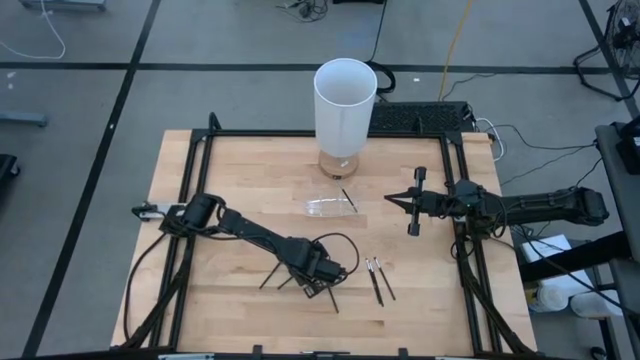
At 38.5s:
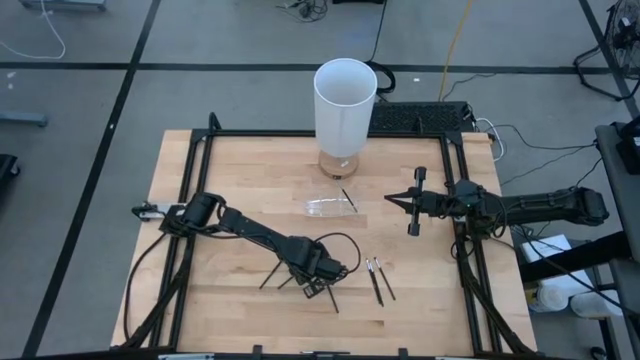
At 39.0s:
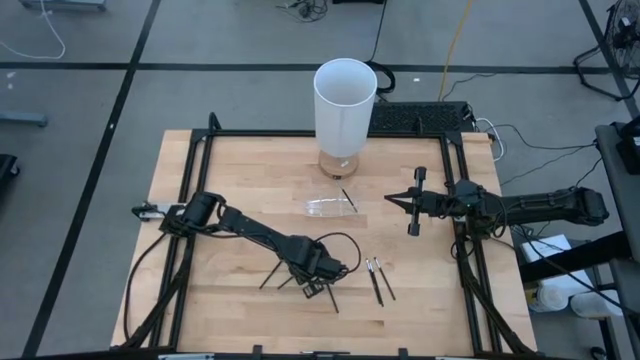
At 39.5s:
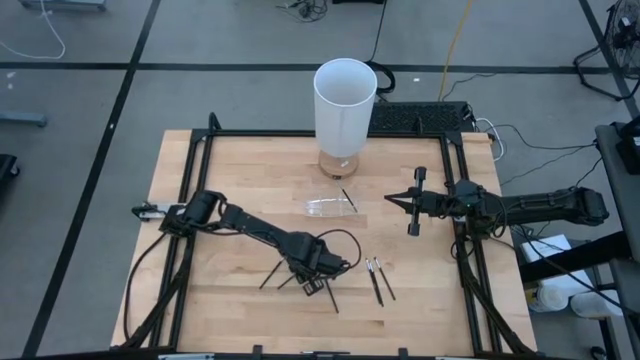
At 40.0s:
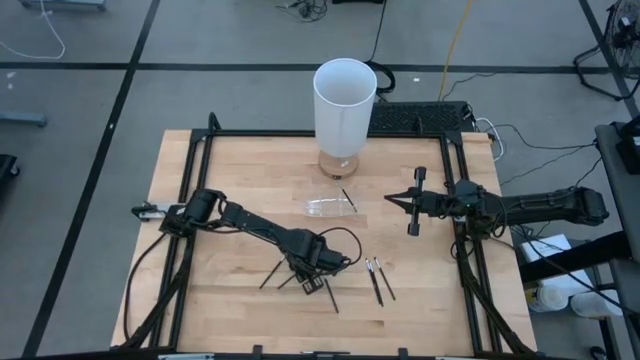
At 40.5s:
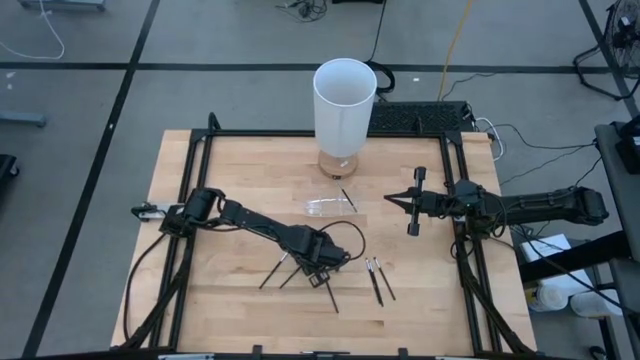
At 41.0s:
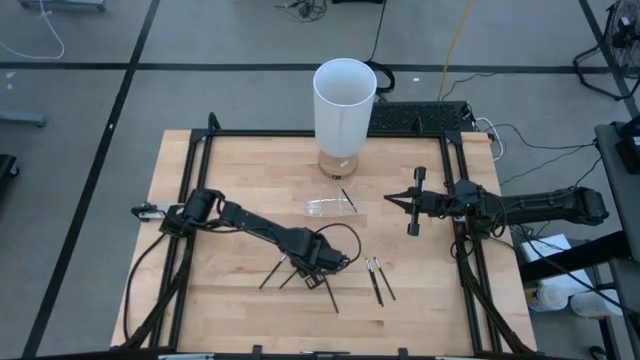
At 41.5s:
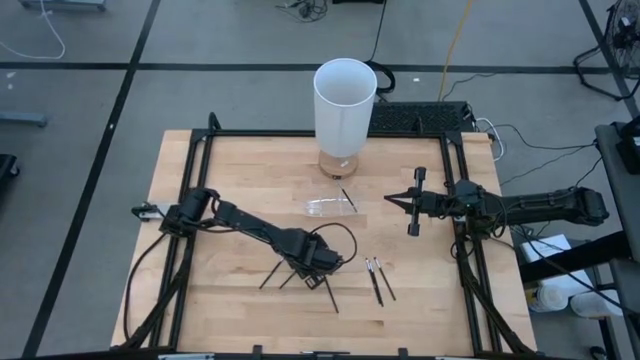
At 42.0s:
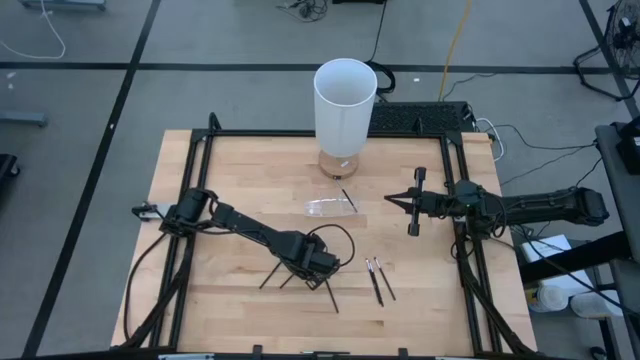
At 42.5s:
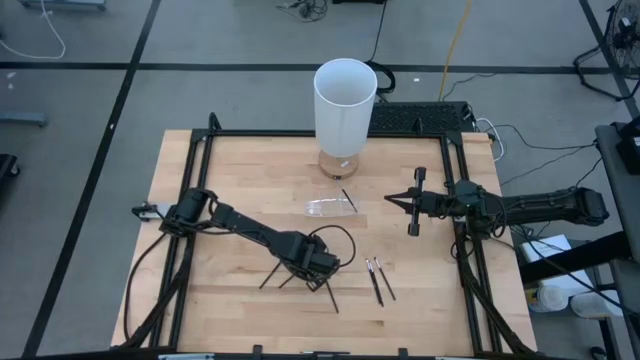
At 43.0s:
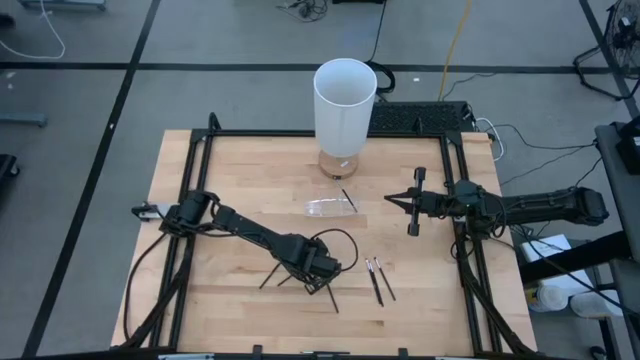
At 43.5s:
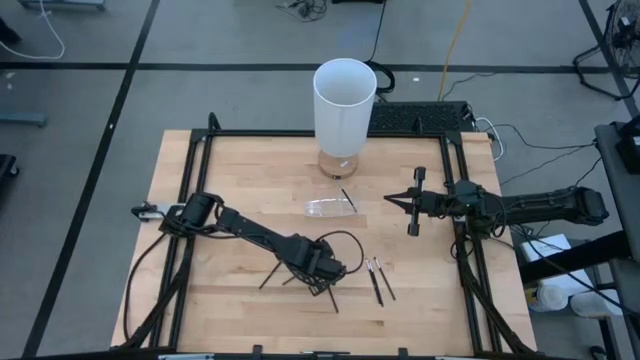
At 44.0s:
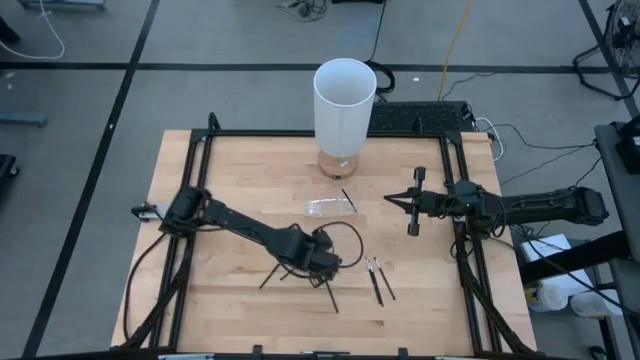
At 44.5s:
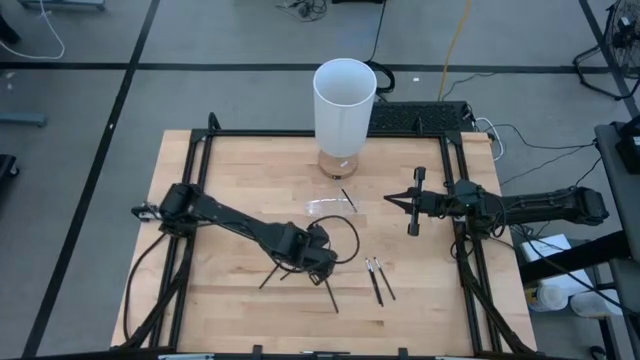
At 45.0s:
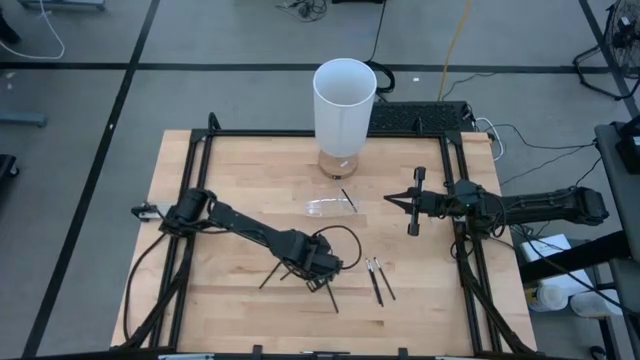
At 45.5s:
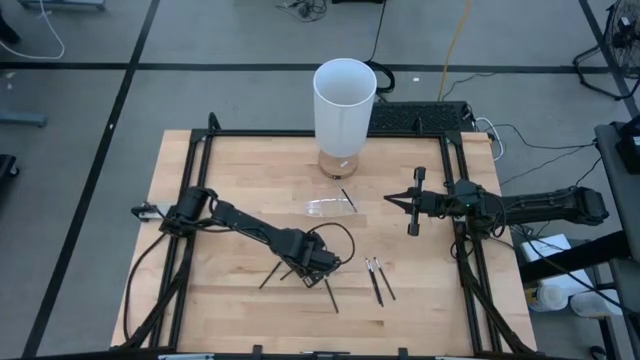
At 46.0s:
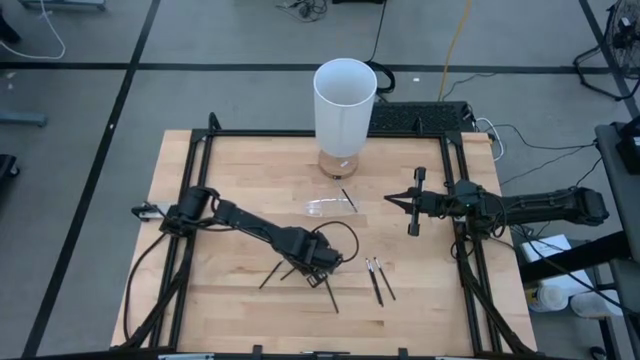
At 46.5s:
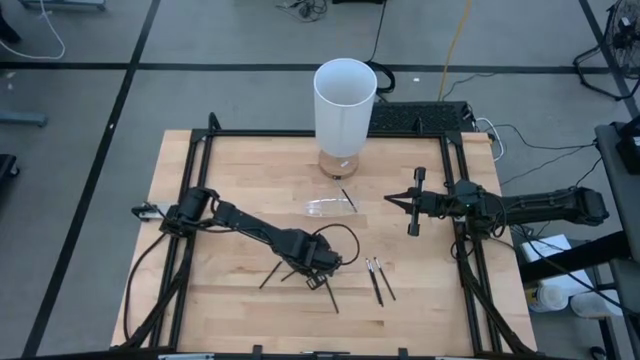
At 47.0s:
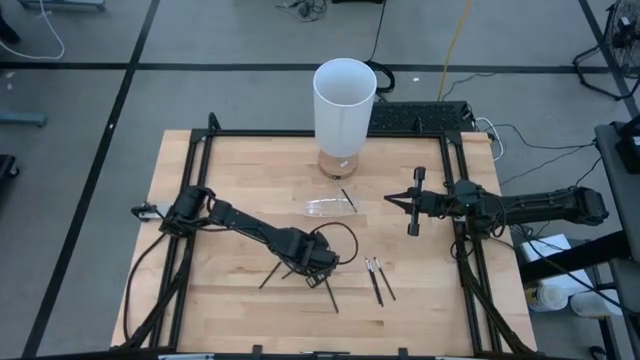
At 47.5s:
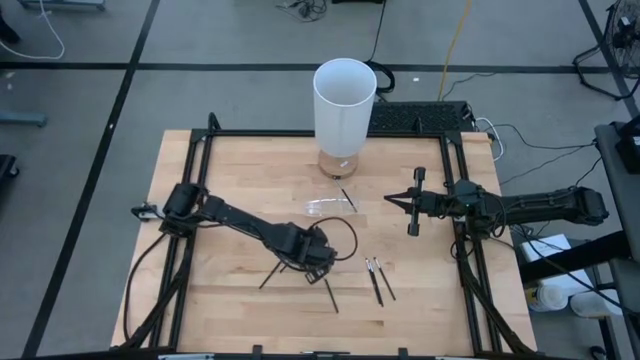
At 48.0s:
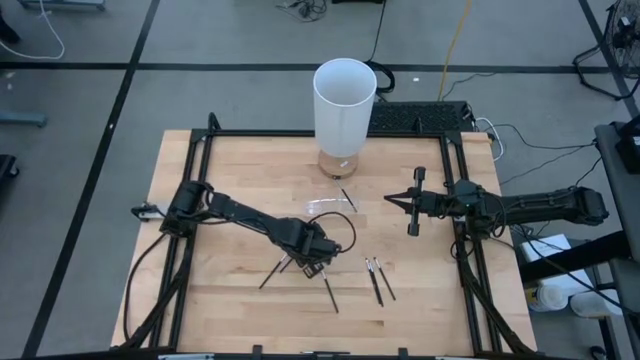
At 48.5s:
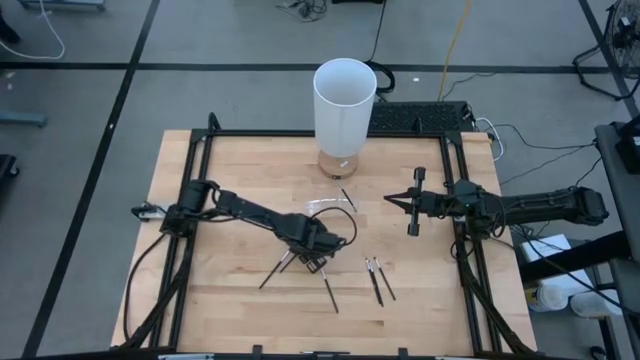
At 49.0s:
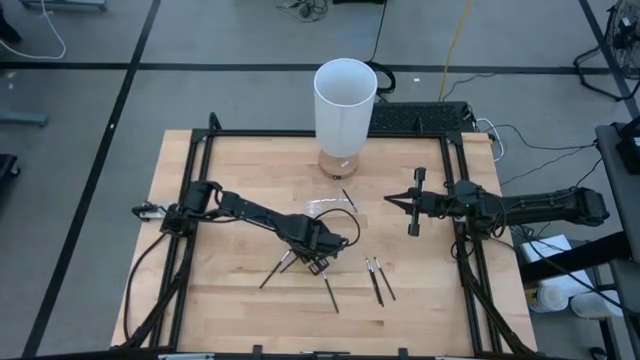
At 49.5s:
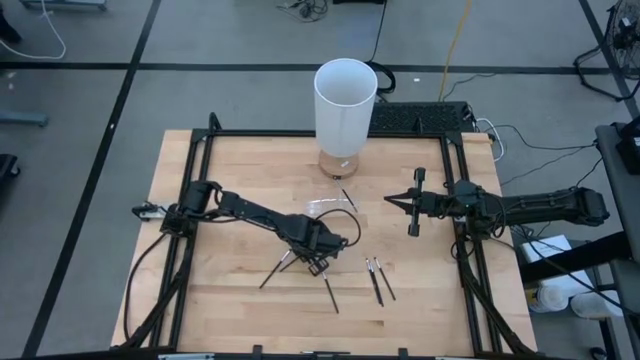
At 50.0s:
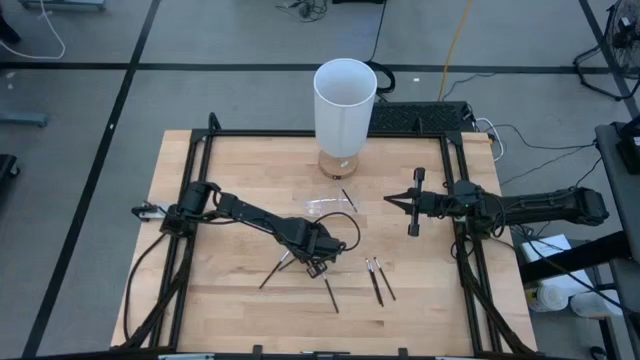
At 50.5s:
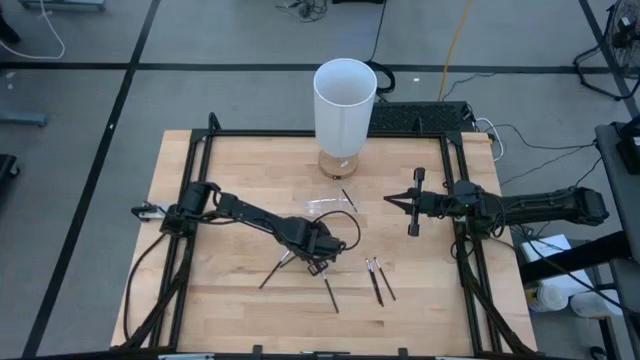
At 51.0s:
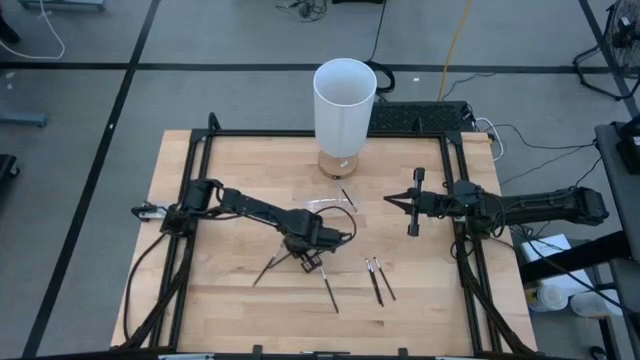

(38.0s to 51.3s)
Task: Put items in baskets/containers
Put the brow brush into the transparent organizer

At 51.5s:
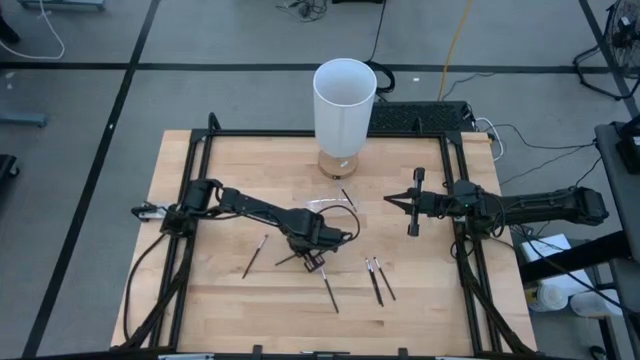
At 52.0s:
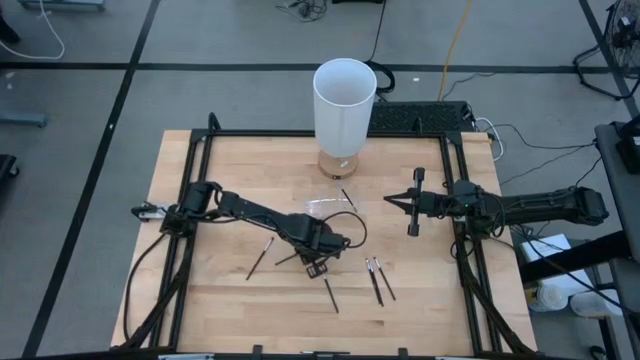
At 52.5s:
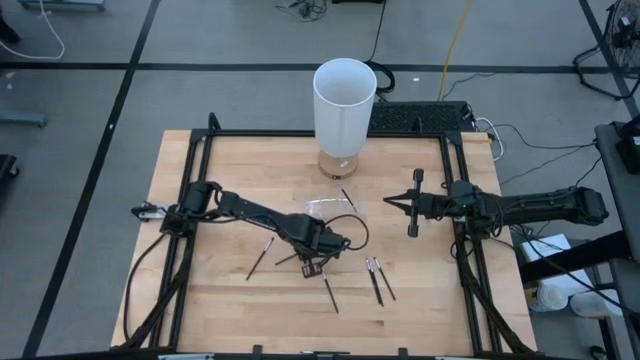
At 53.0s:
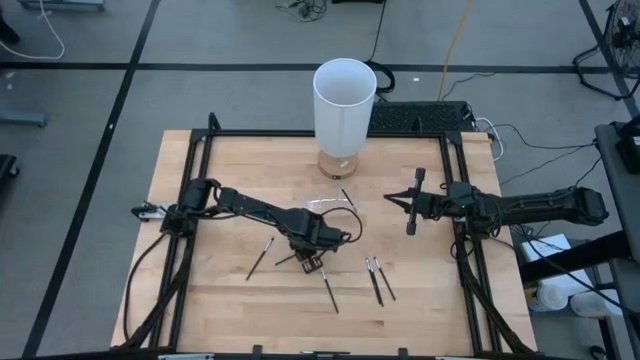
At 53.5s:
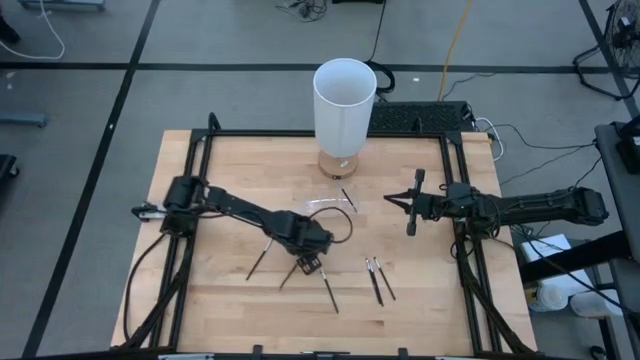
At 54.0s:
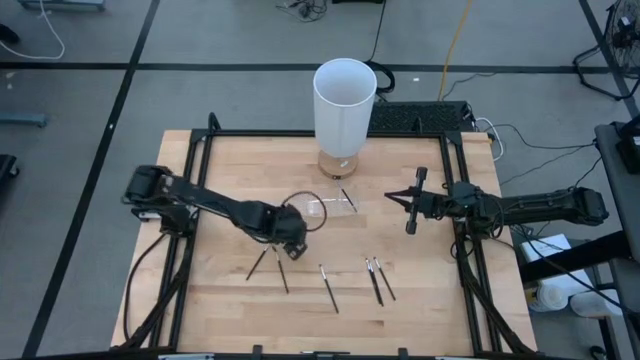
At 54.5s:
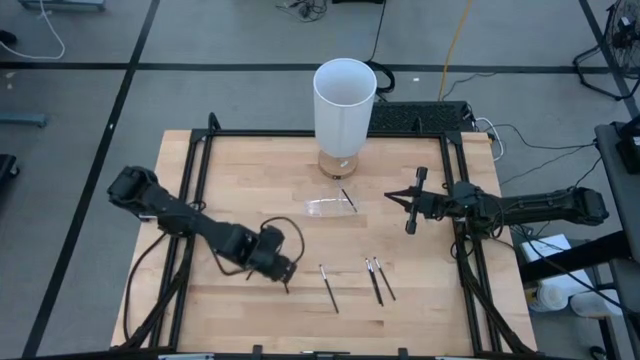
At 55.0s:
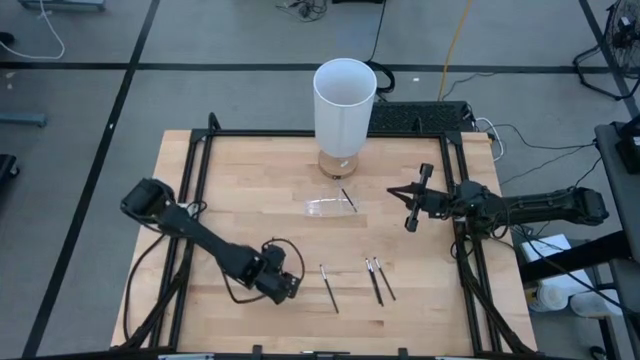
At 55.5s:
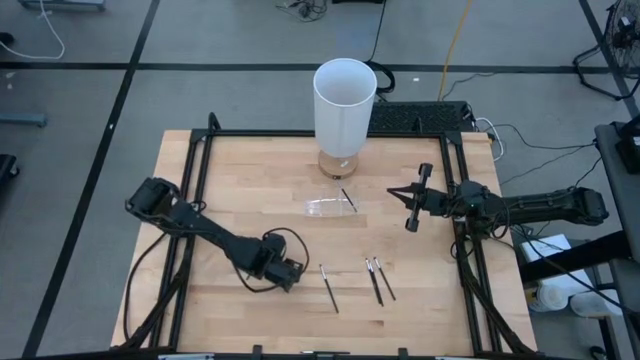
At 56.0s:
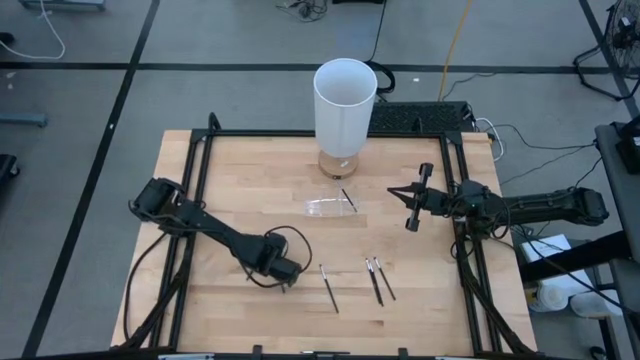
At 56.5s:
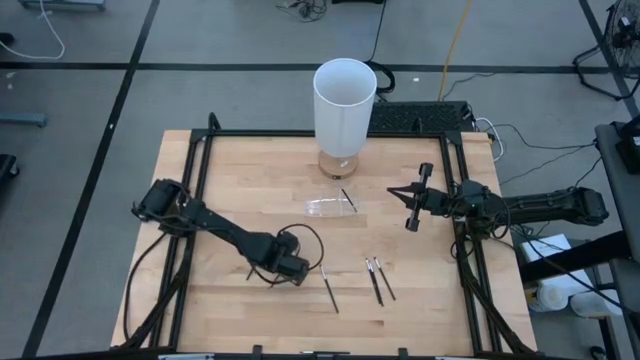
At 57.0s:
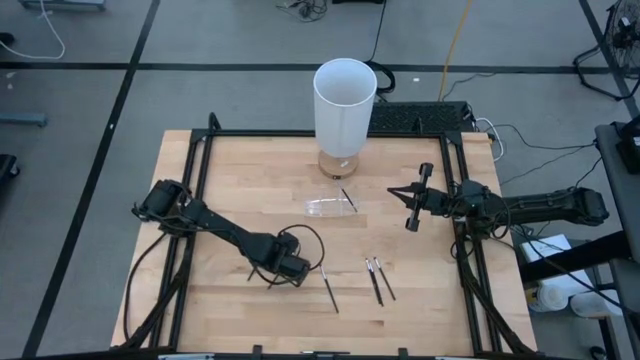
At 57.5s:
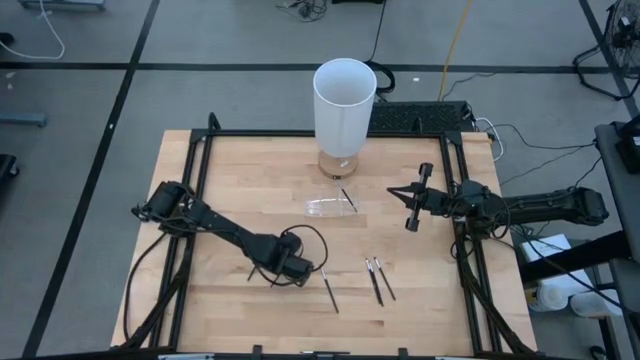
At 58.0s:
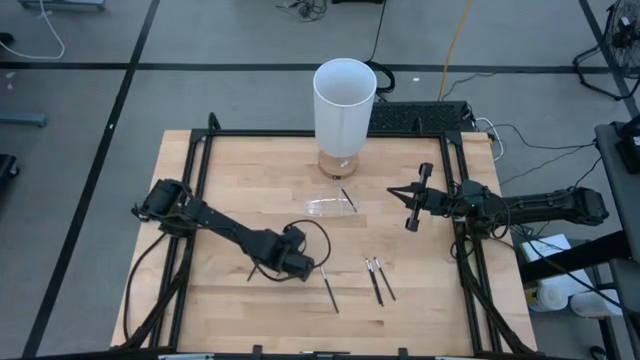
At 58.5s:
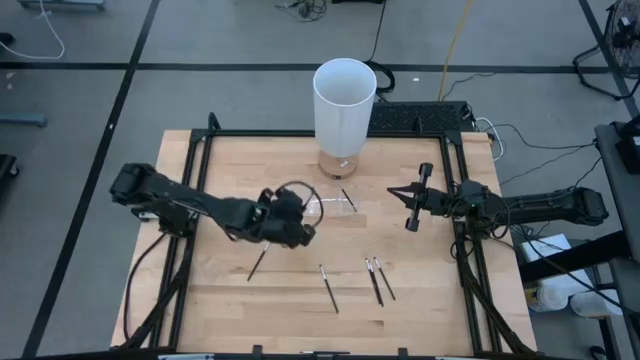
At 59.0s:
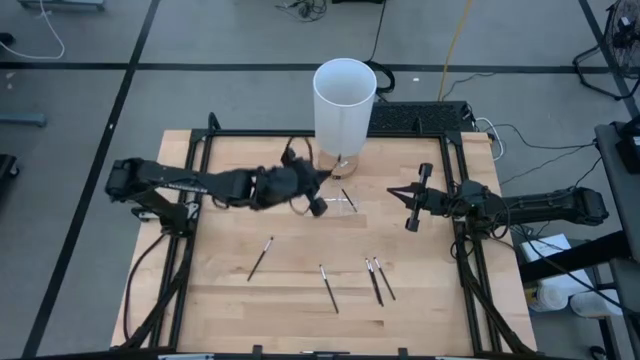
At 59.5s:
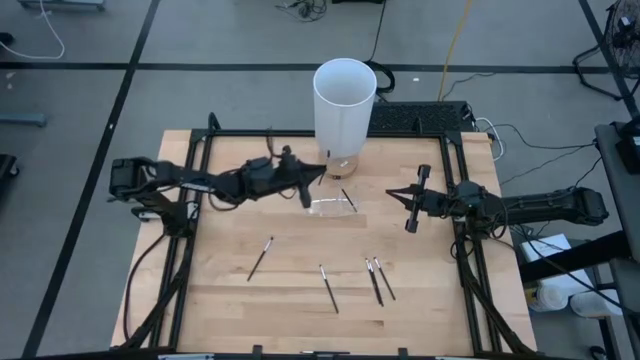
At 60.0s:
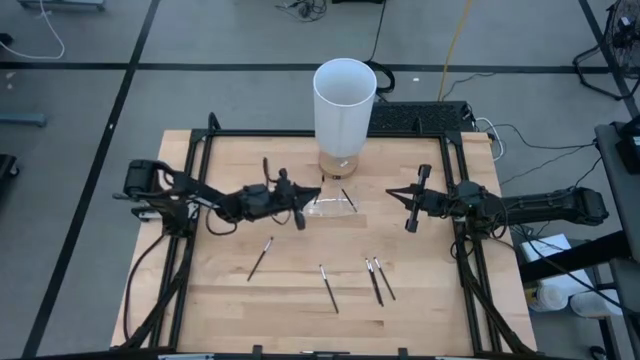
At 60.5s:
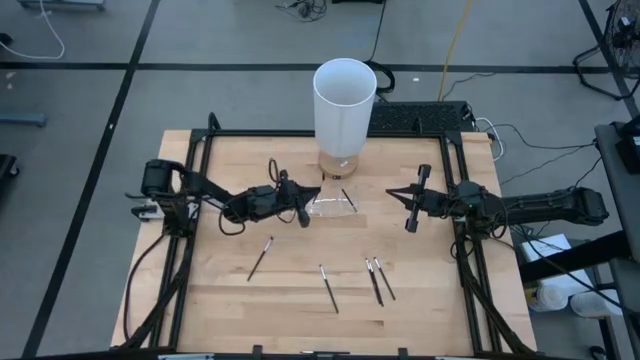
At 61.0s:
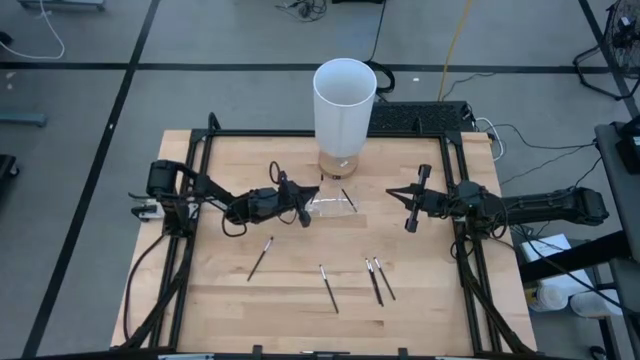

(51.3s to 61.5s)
Put the brow brush into the transparent organizer
